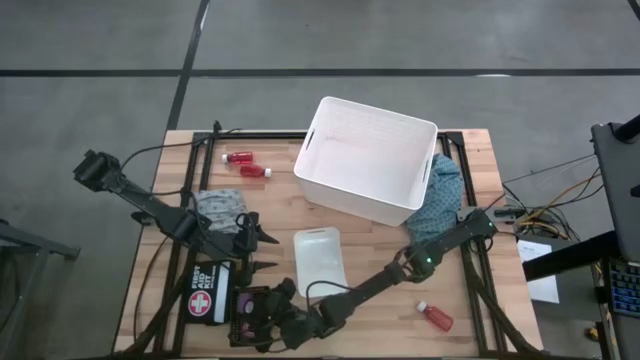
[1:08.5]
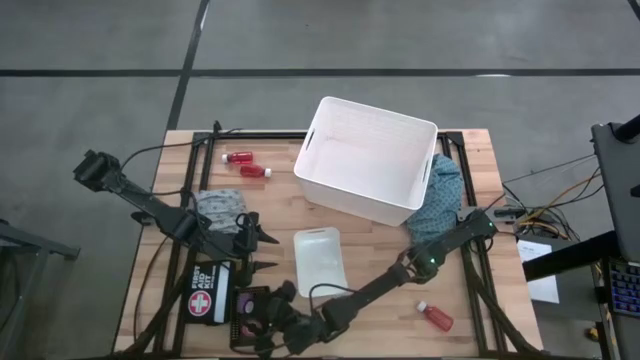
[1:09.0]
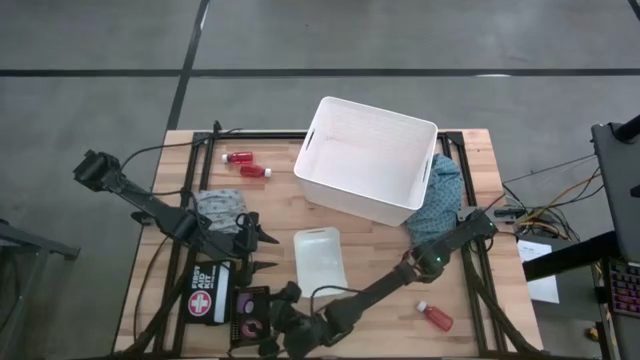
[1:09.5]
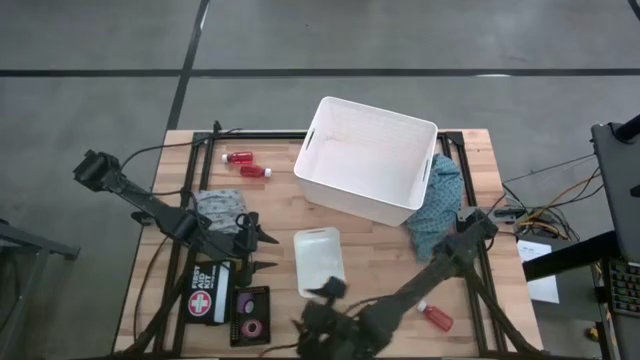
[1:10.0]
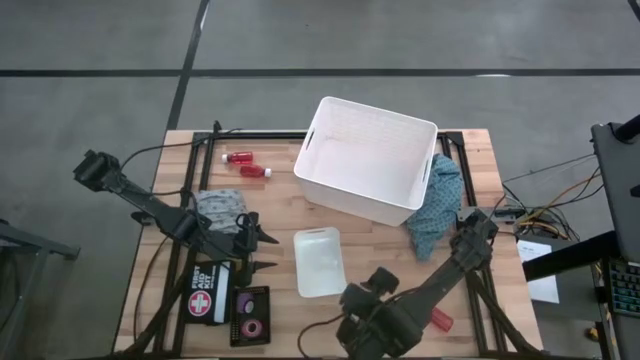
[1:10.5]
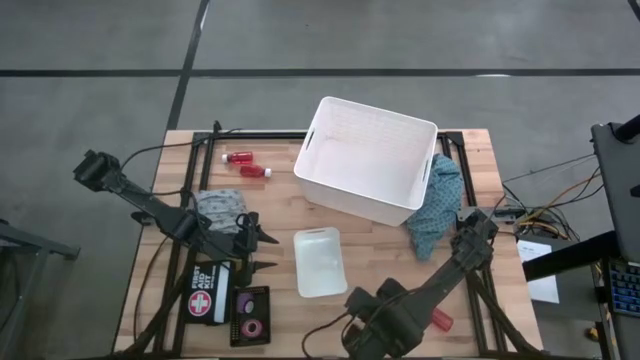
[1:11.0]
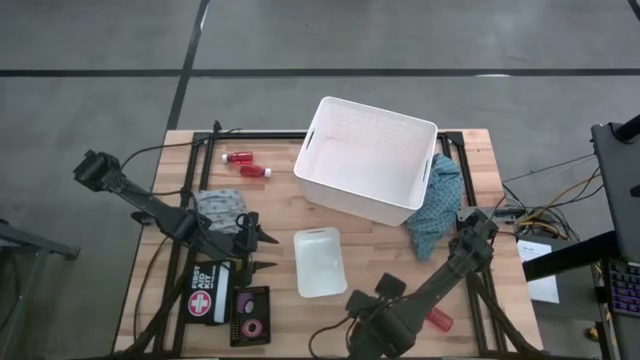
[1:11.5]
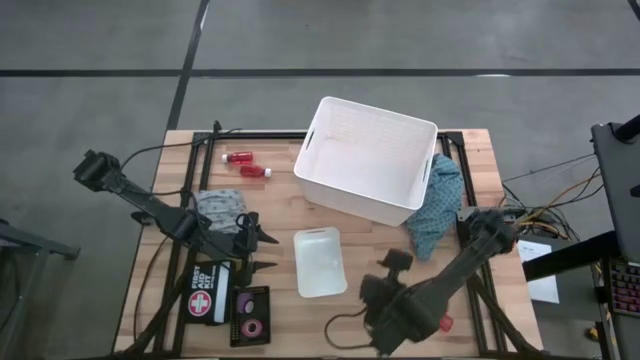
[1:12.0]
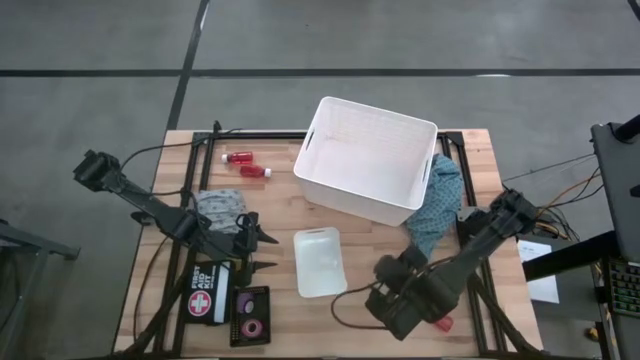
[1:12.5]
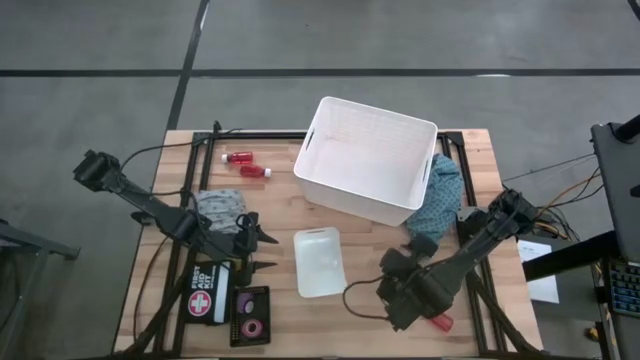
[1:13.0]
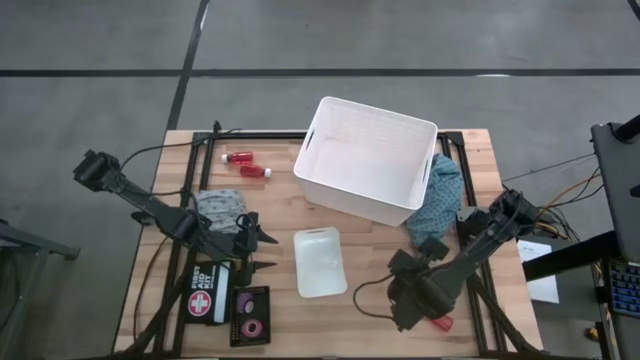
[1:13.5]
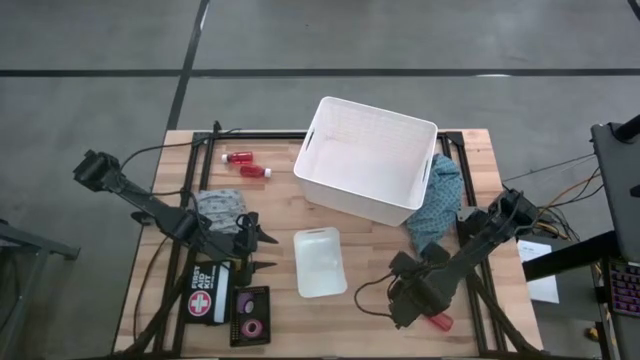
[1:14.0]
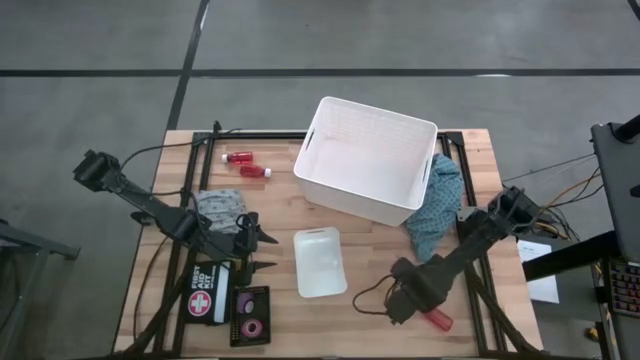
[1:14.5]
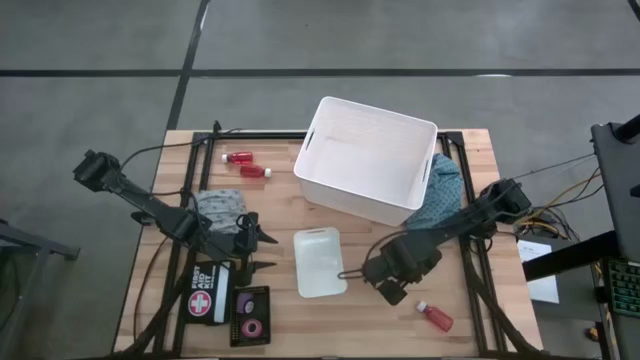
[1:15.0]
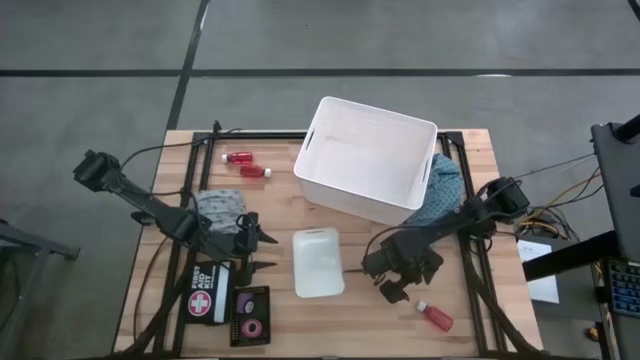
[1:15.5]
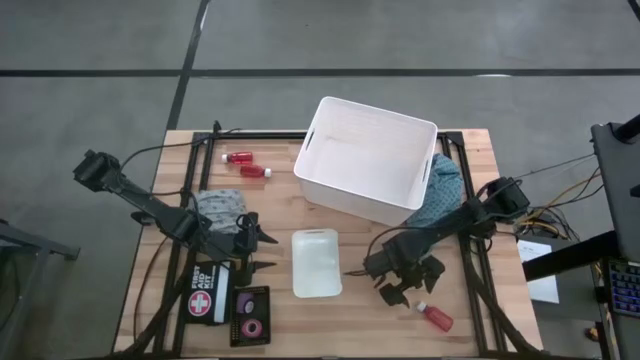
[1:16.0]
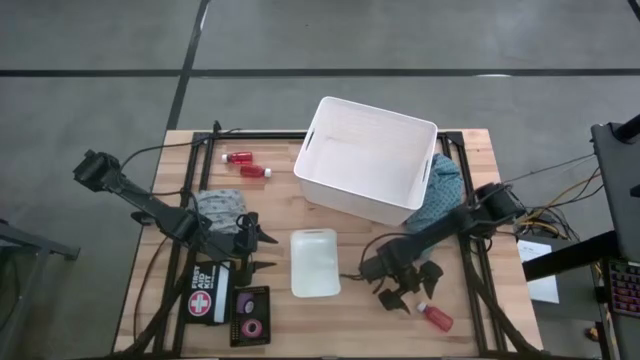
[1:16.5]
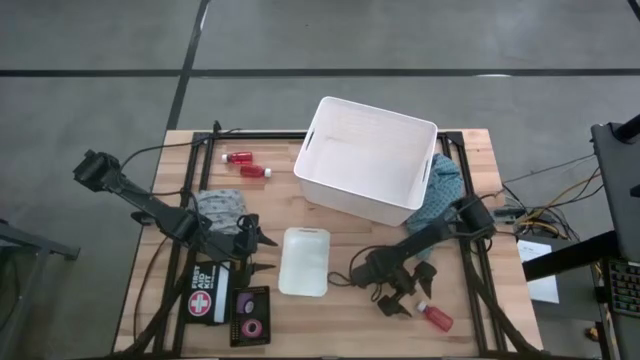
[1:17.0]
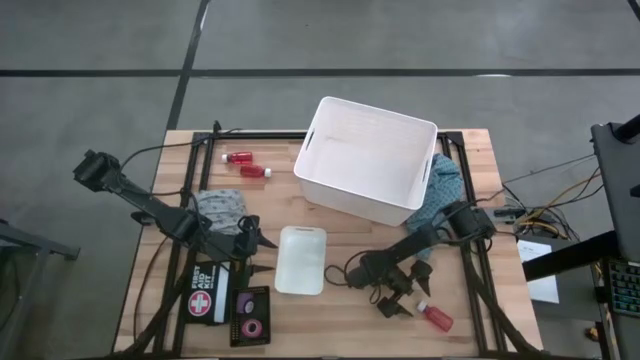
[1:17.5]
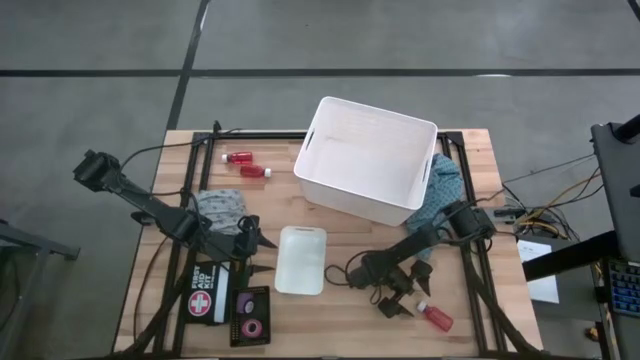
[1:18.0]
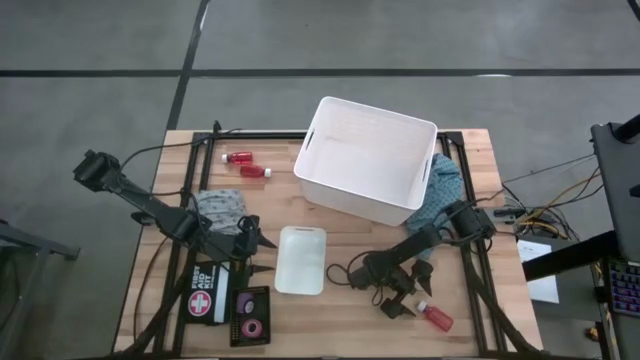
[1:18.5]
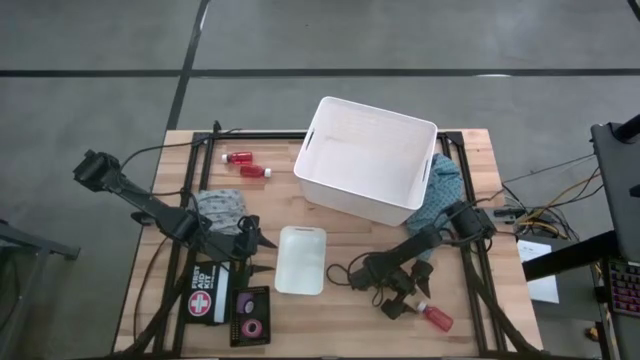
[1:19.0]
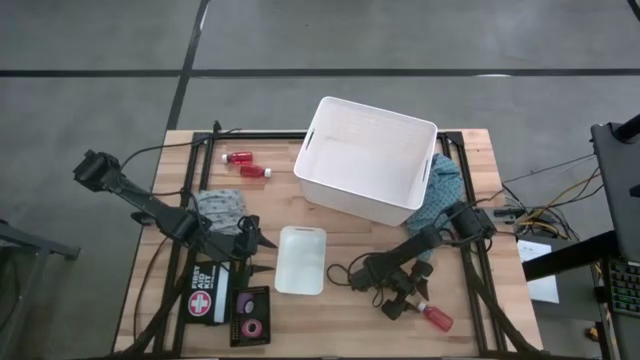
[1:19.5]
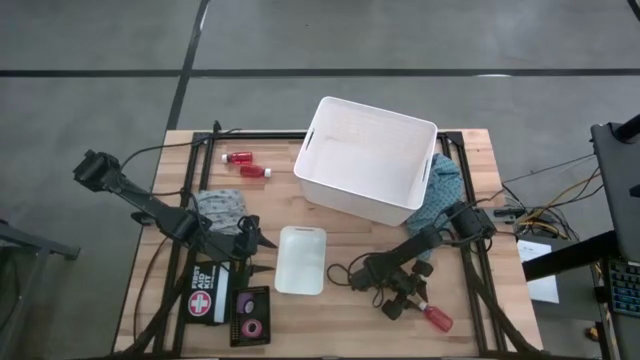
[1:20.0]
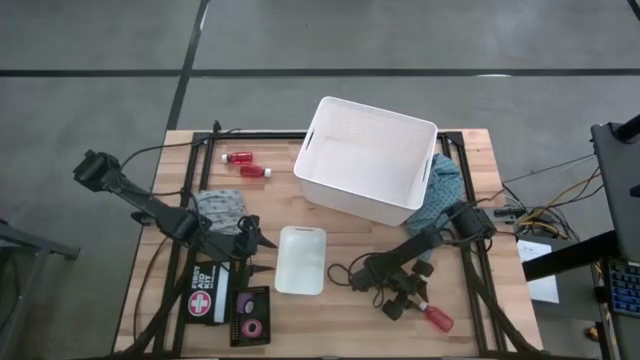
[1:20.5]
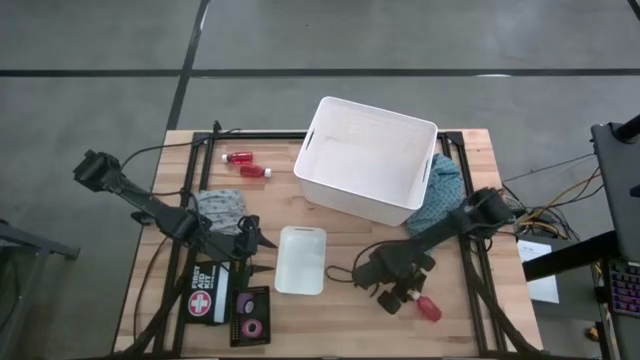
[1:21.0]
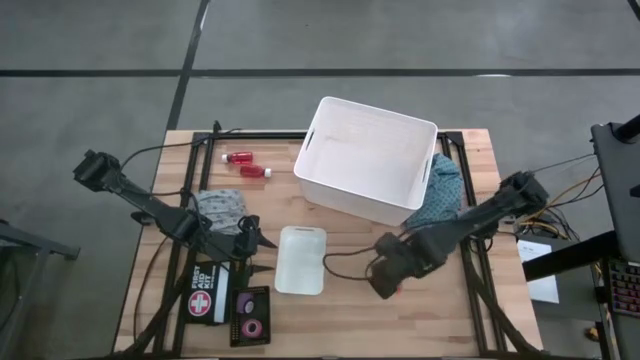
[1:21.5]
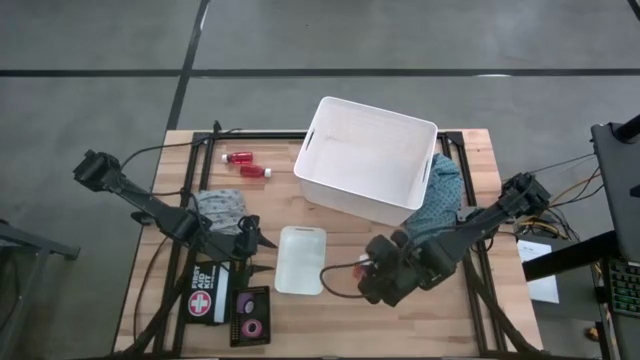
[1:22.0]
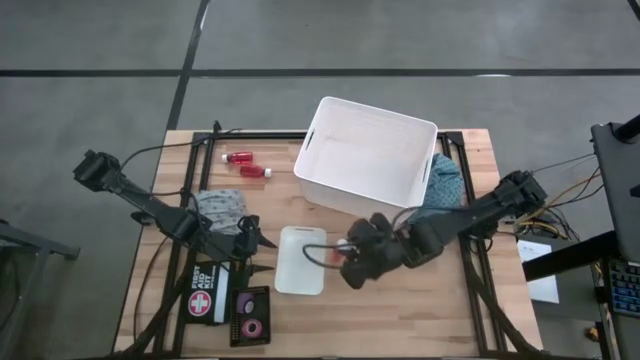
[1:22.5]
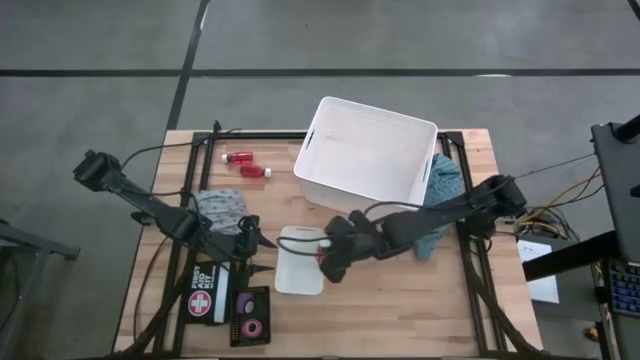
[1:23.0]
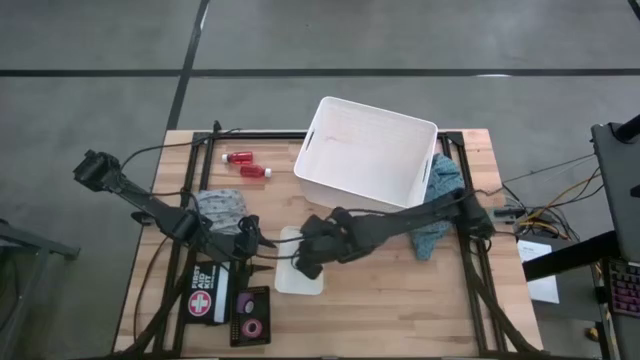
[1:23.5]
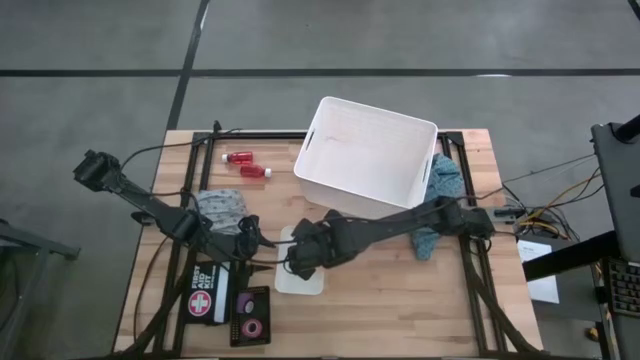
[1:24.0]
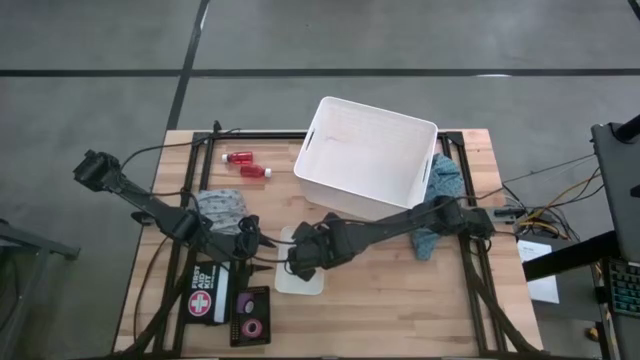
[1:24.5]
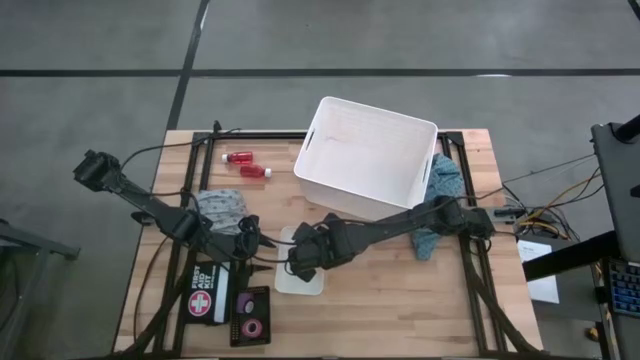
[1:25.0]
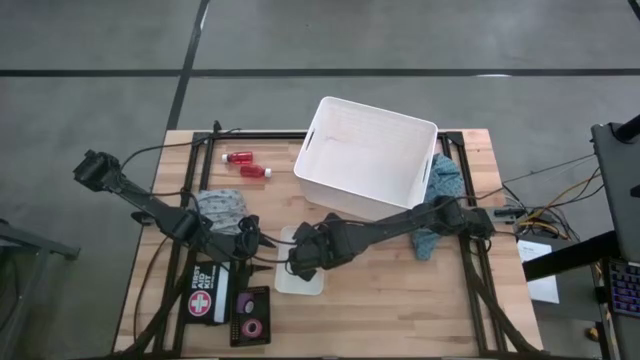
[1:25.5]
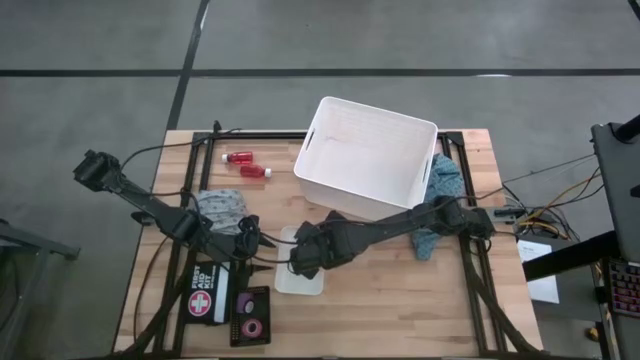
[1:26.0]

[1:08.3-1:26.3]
Task: Pick & Place Medicine items
Put the bottom red medicine bottle into the small white bin

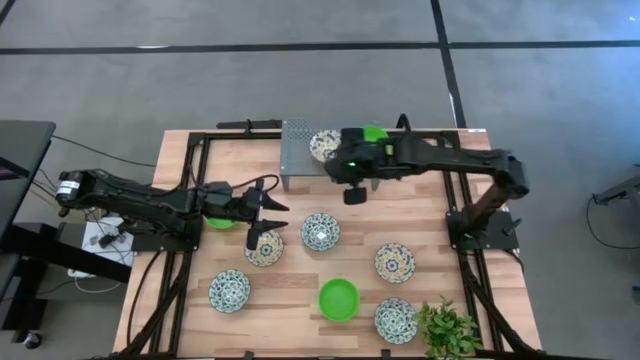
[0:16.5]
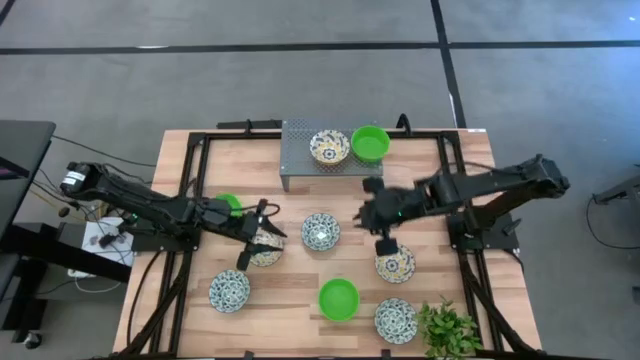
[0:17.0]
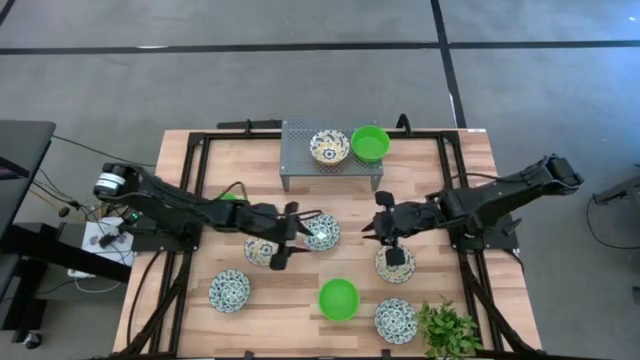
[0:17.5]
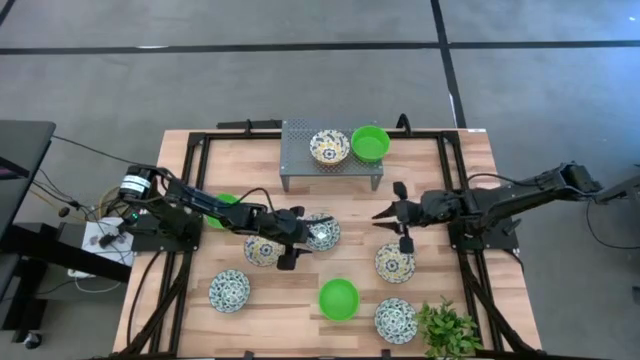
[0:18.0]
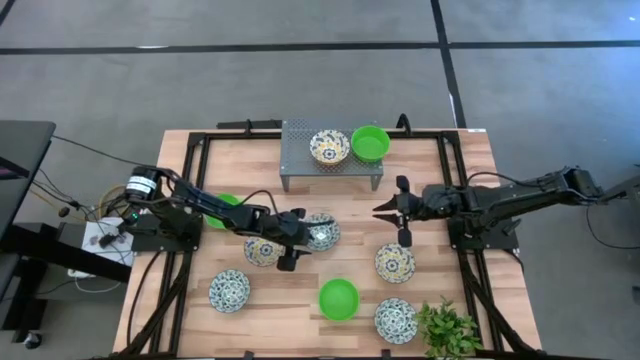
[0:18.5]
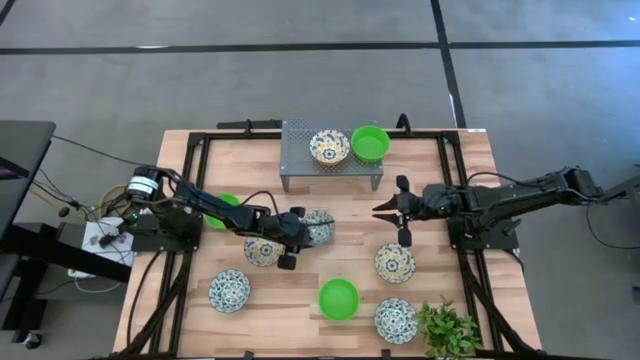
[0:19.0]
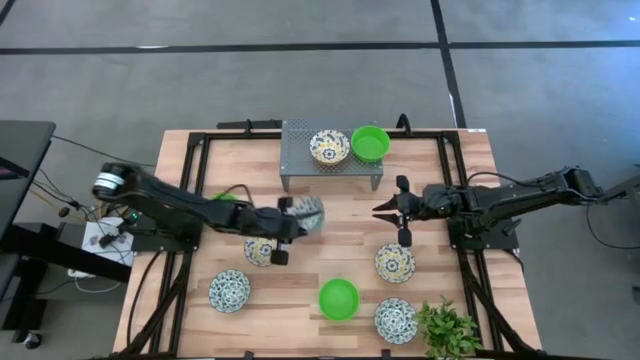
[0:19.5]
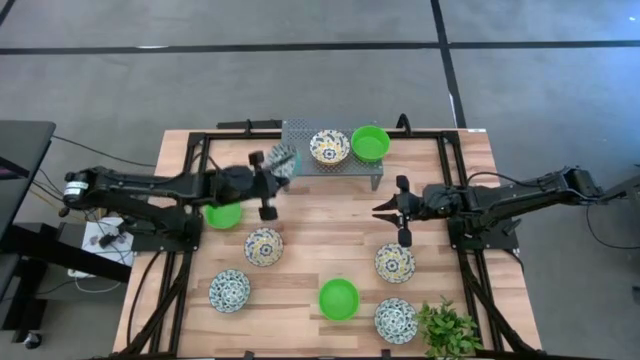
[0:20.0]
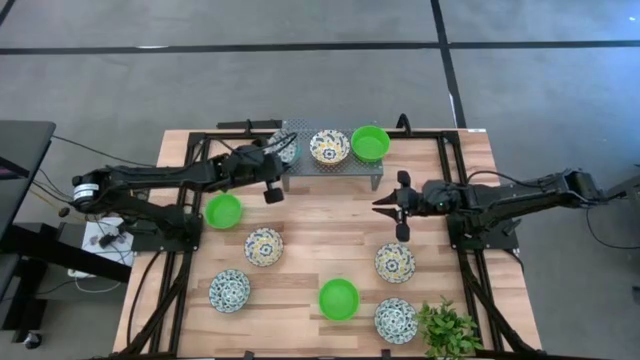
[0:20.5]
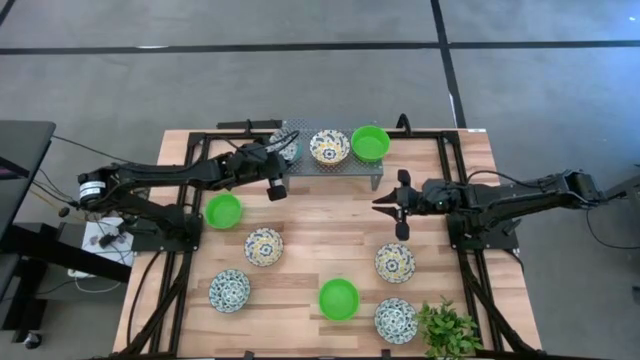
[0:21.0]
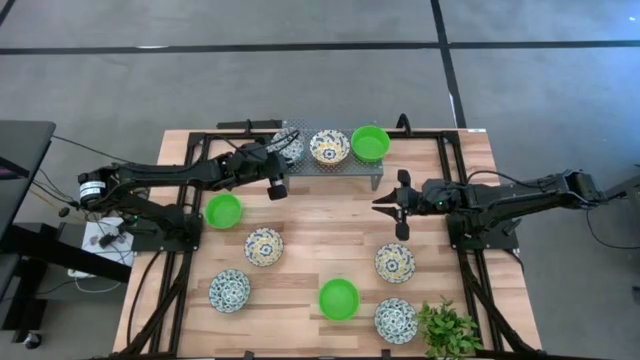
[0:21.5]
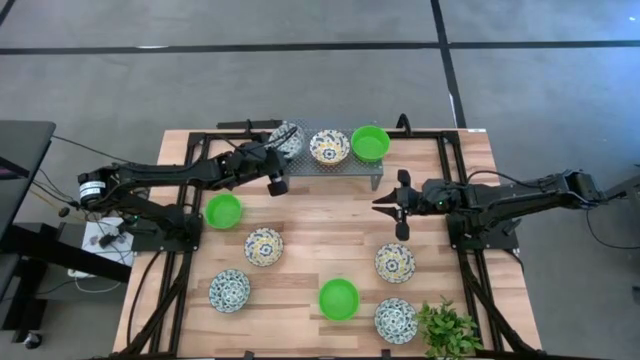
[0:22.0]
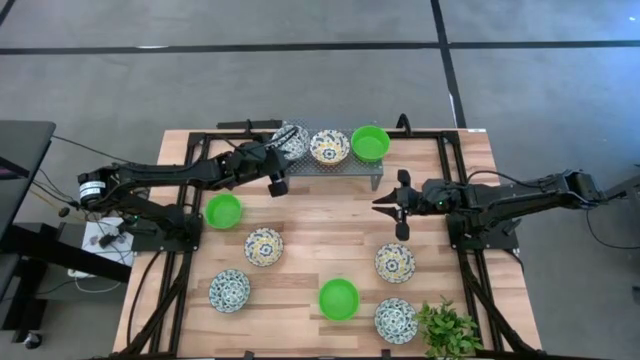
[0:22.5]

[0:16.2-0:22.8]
Task: Pick & Place Mini bowls
Put the blue patterned bowl on the shelf
